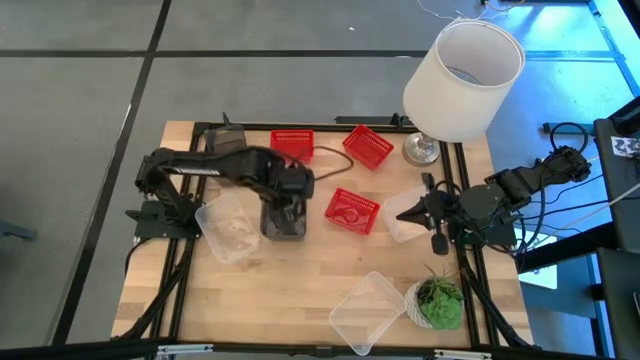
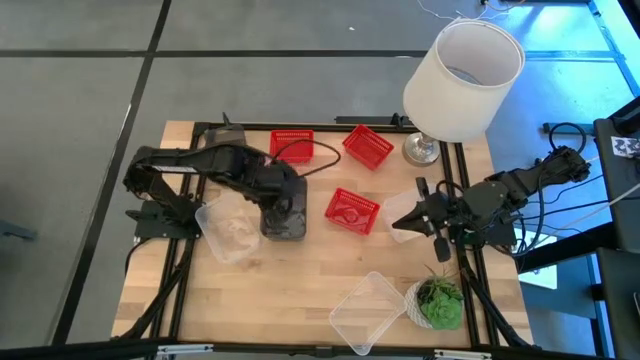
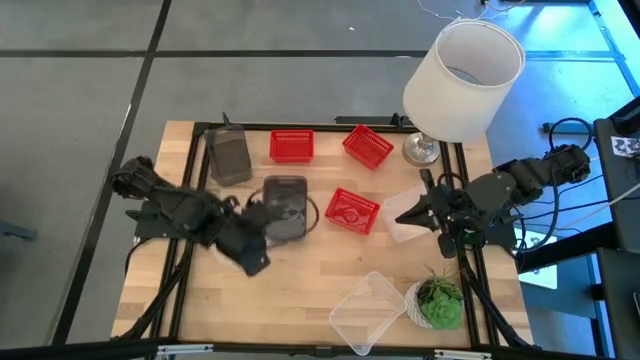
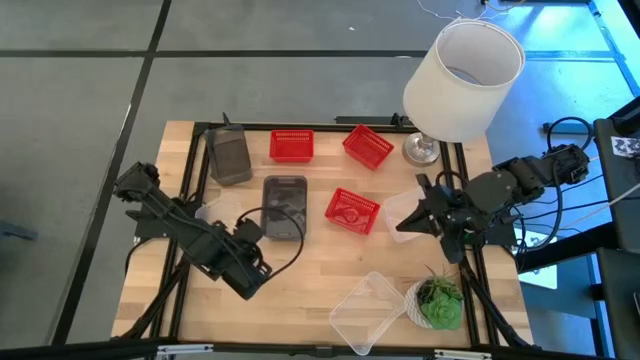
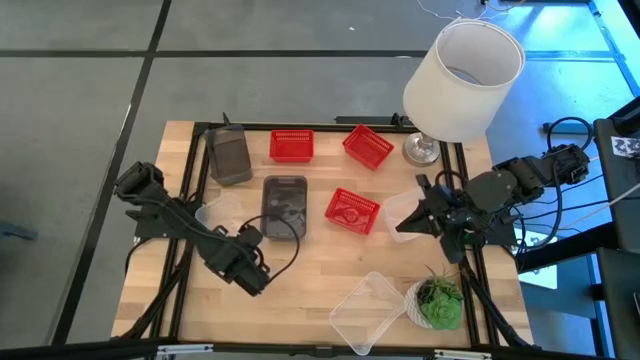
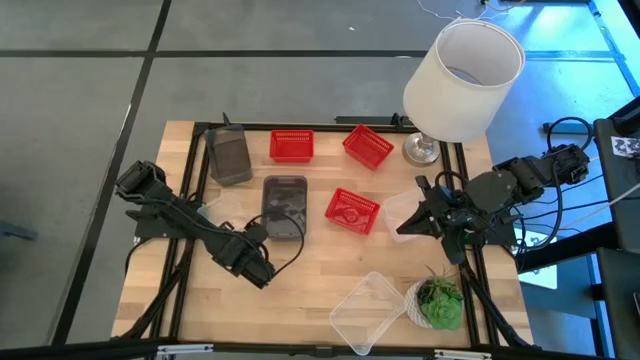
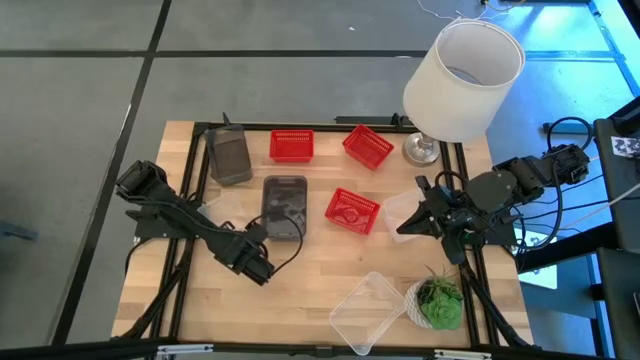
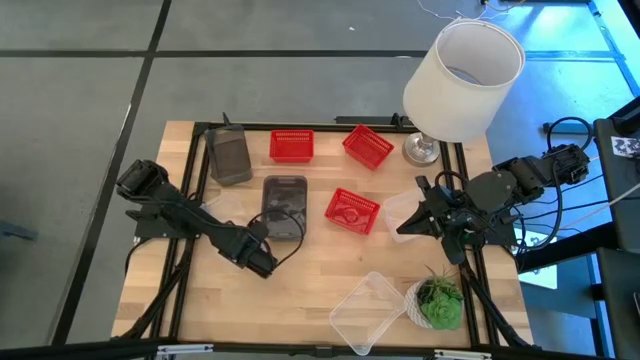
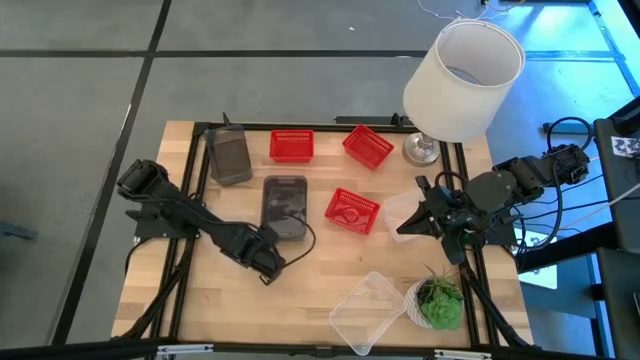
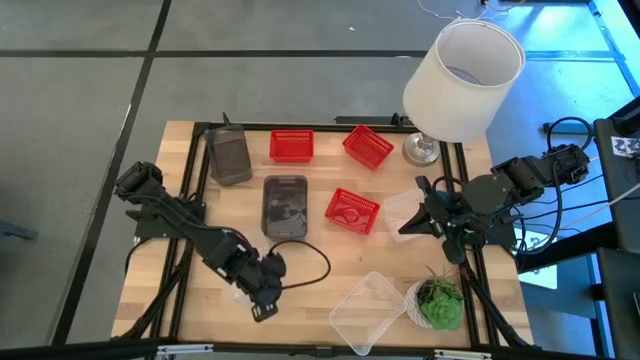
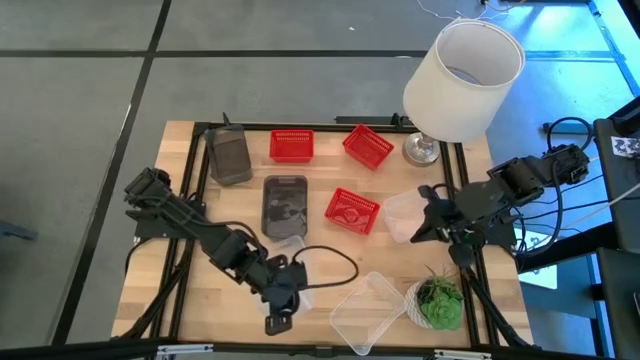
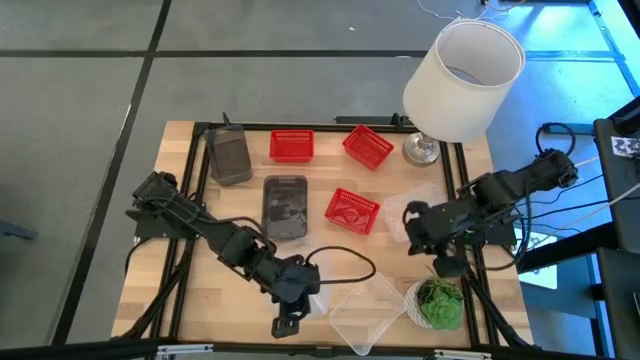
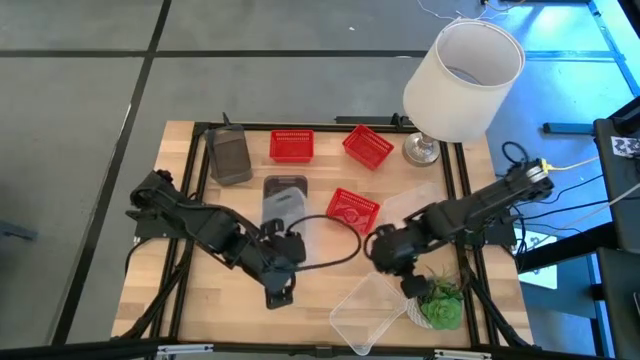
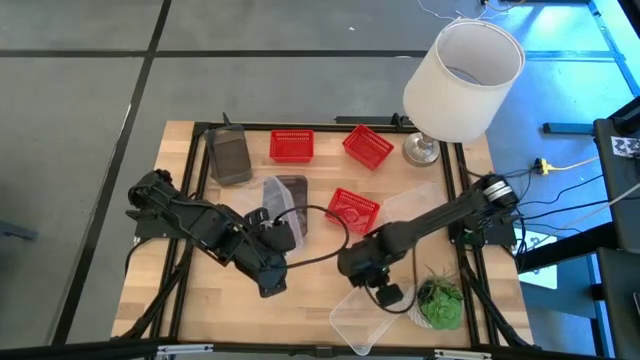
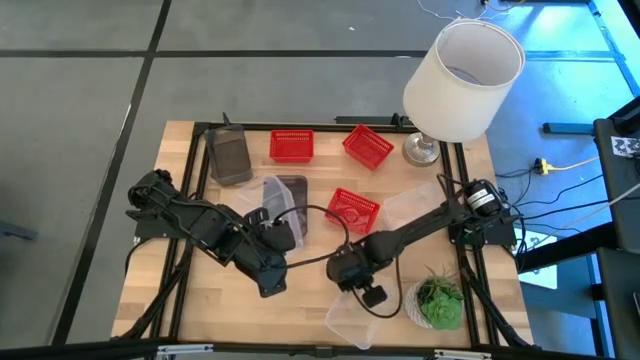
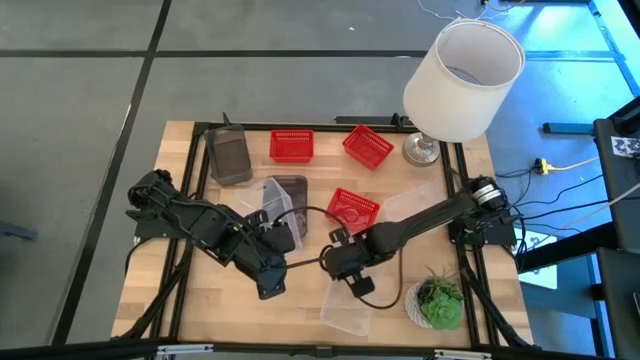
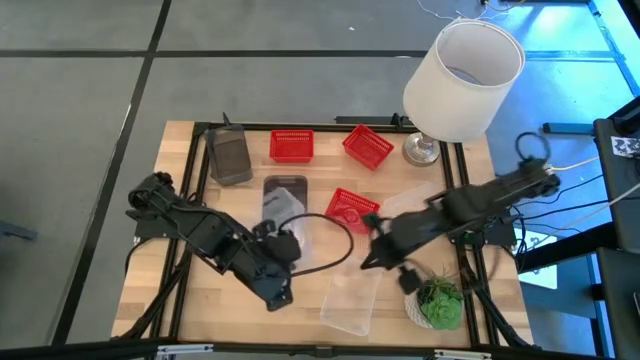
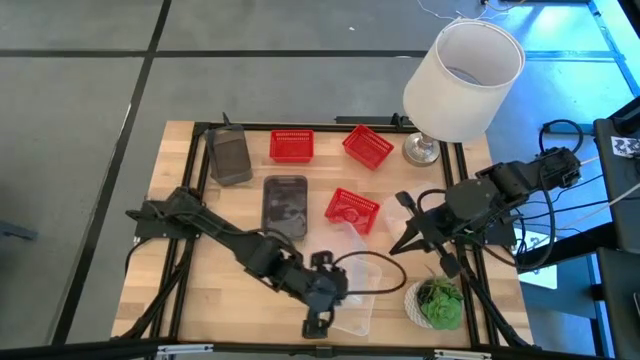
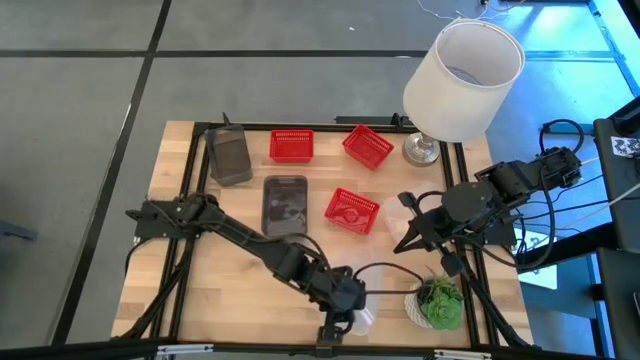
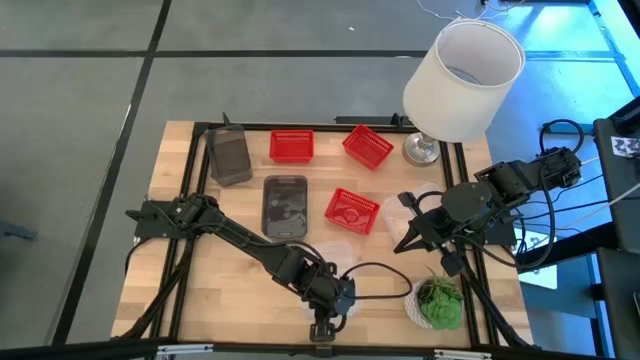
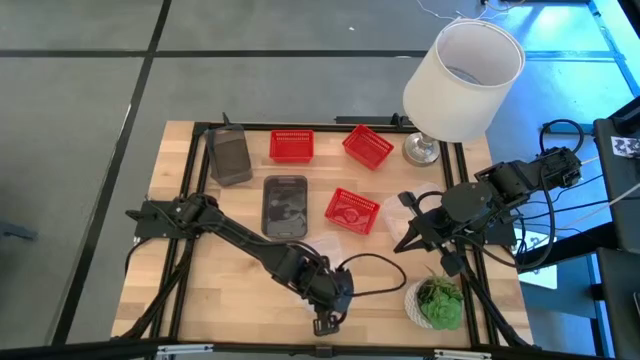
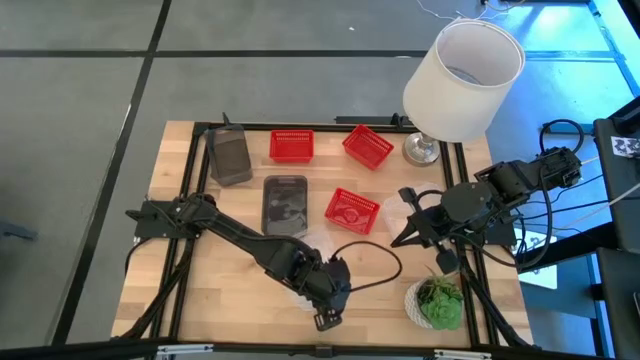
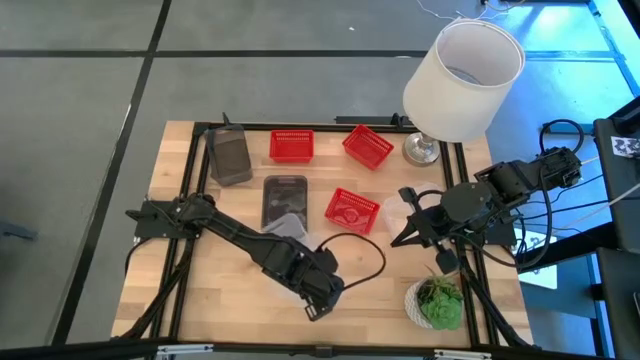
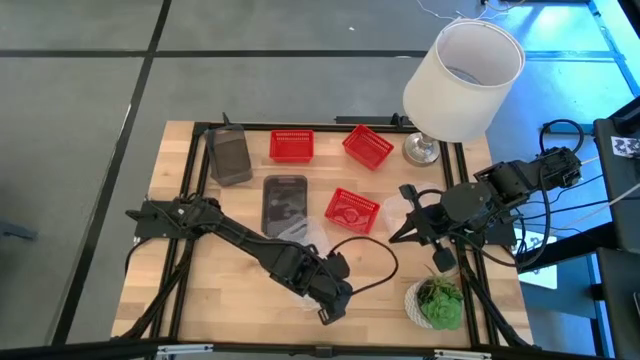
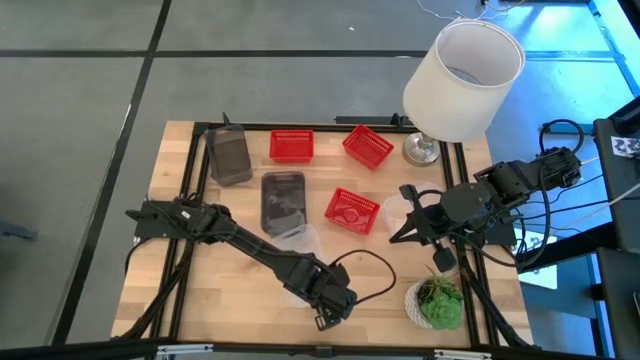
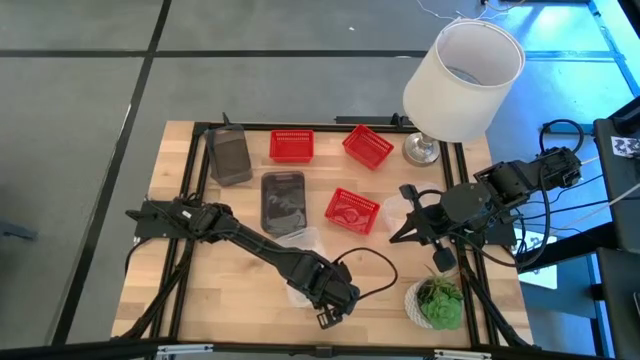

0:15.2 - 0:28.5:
Stack the top left transparent bin on the bottom transparent bin

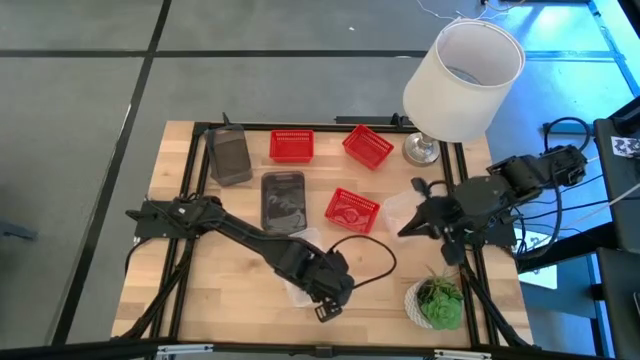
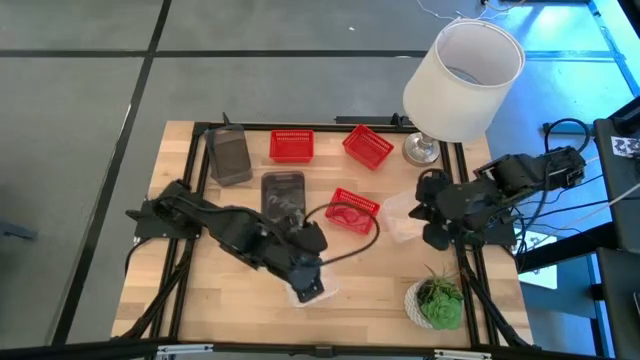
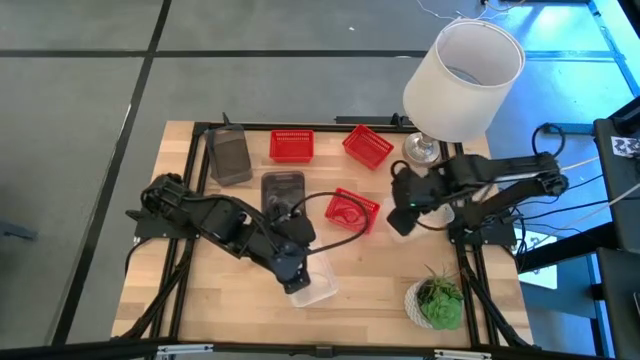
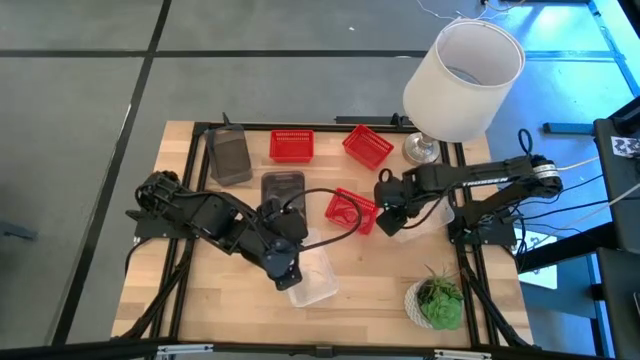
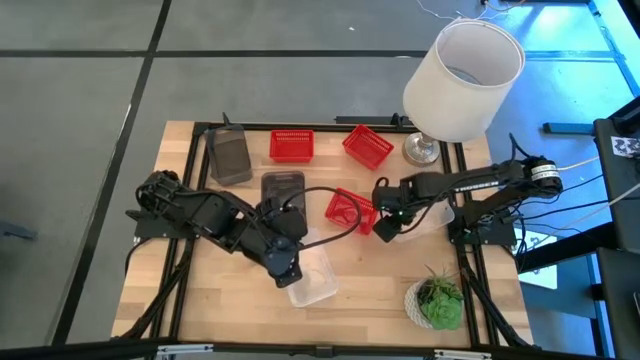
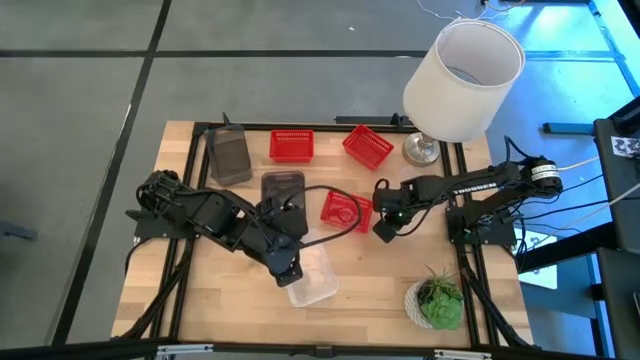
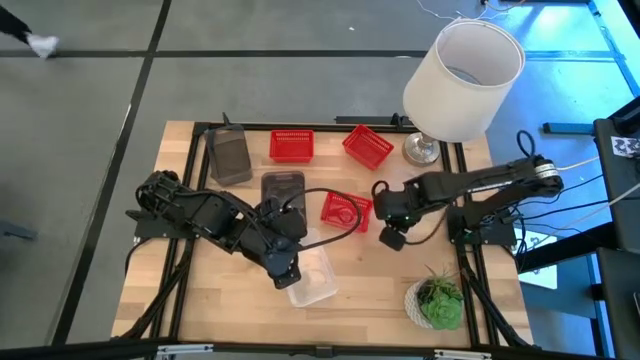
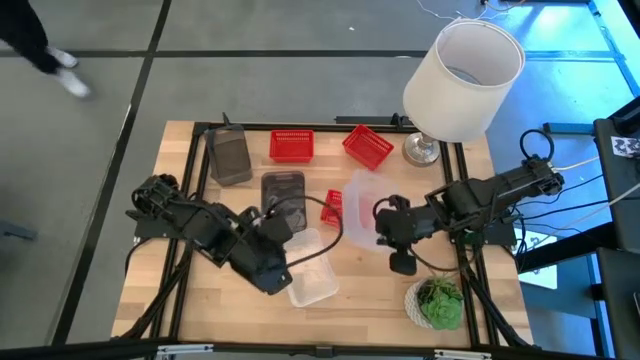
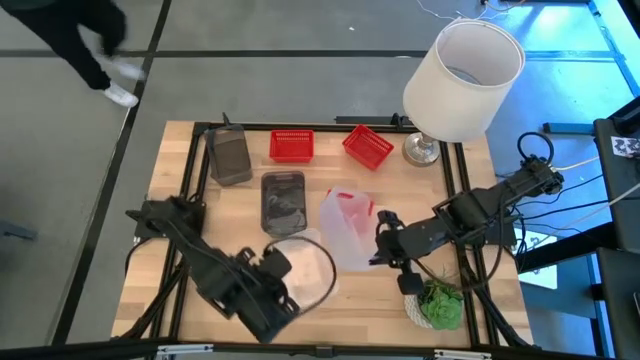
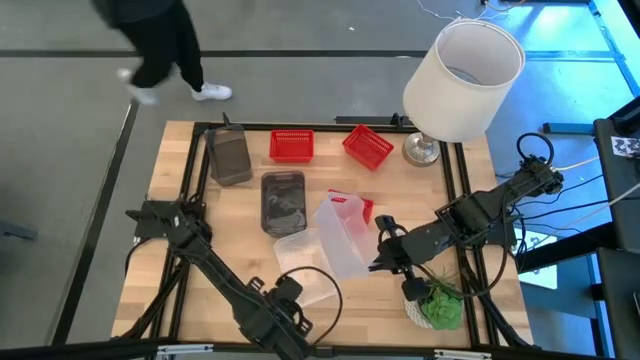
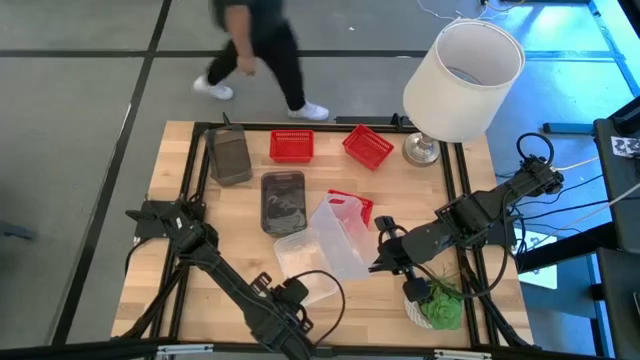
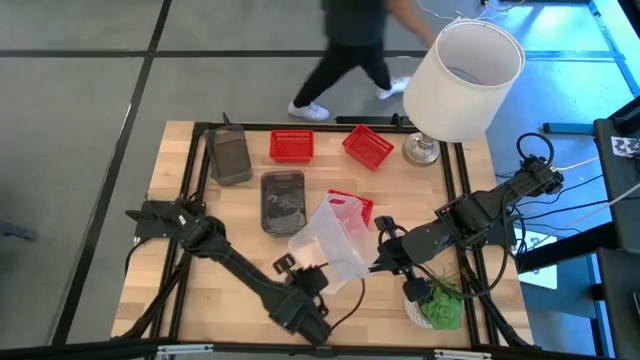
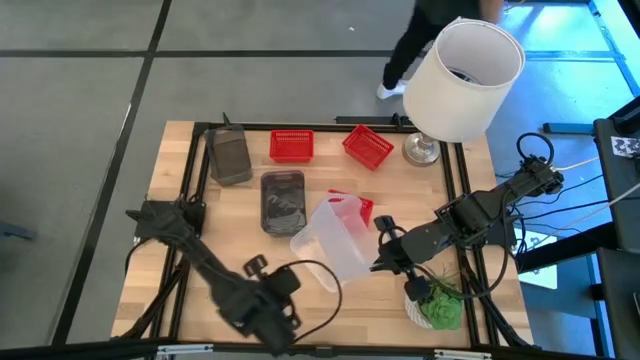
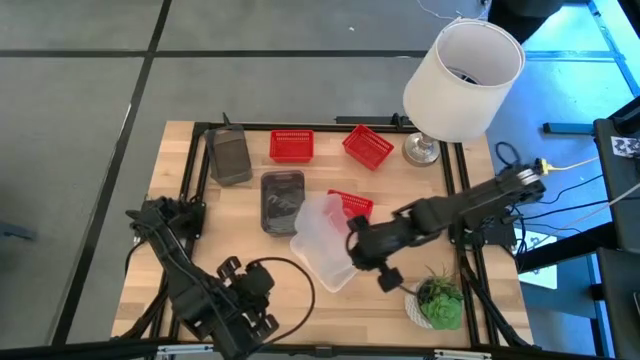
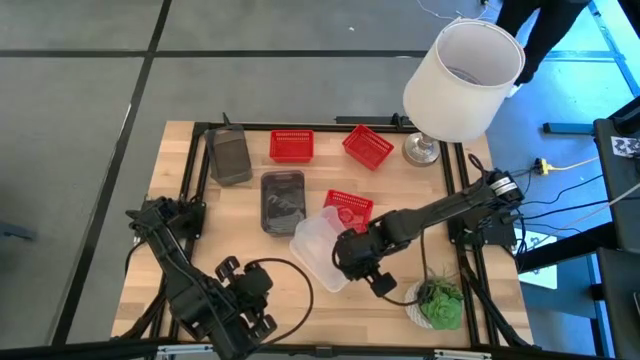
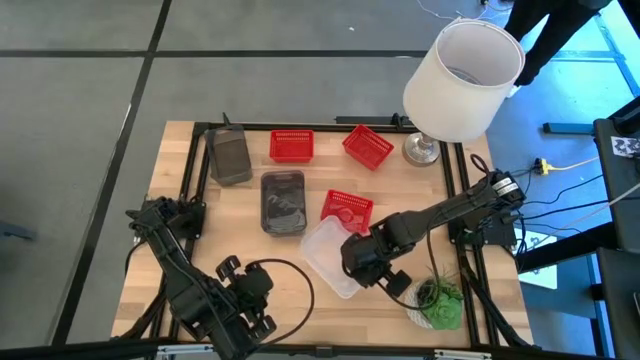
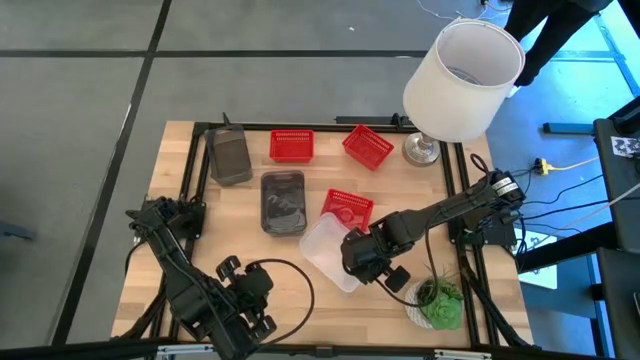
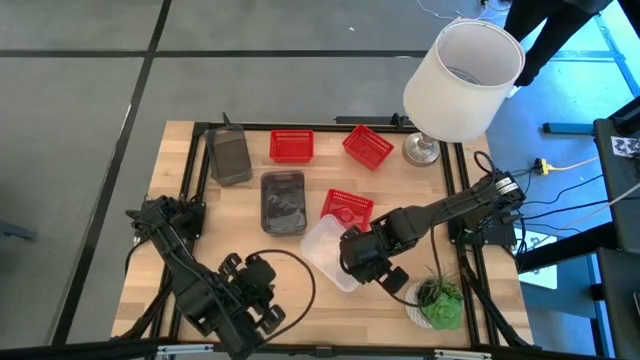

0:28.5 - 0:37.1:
Stack the top transparent bin on the bottom transparent bins
